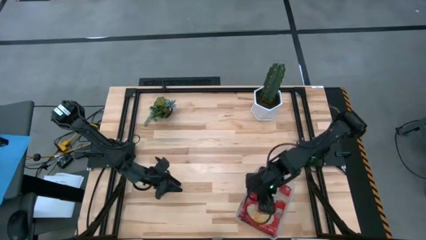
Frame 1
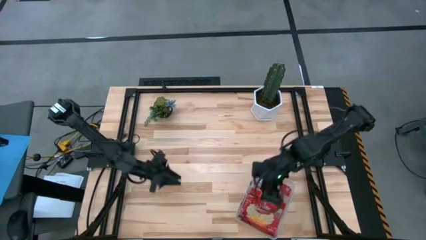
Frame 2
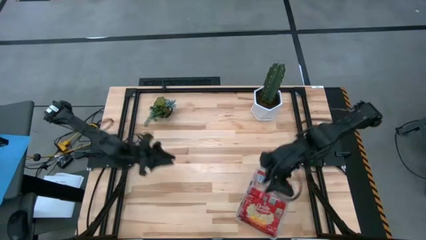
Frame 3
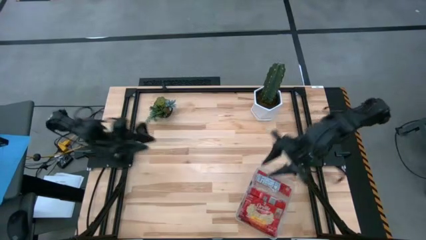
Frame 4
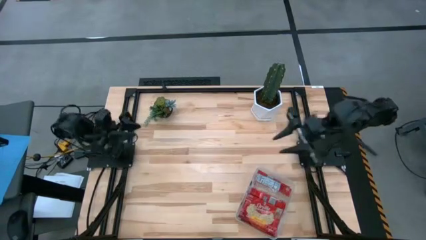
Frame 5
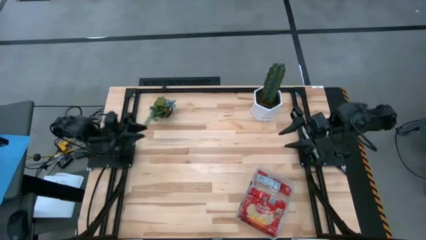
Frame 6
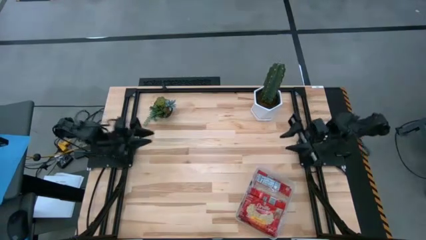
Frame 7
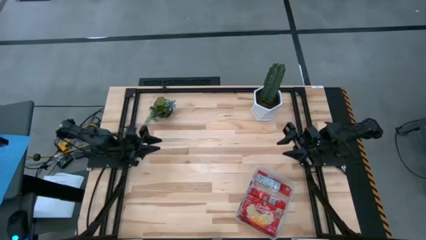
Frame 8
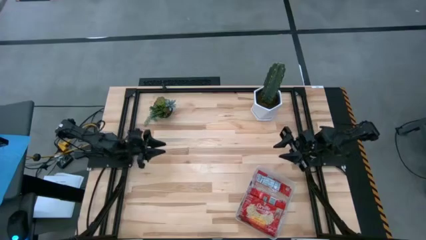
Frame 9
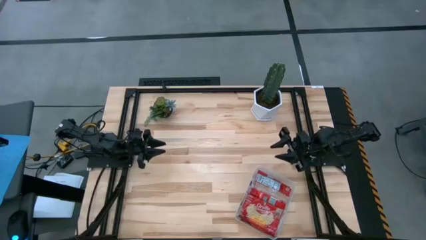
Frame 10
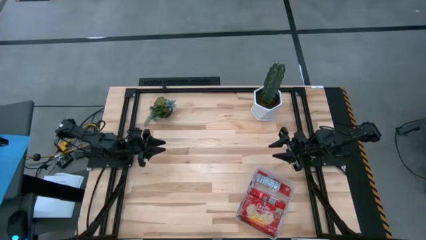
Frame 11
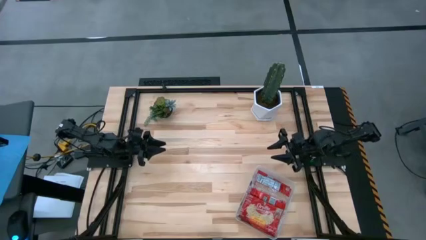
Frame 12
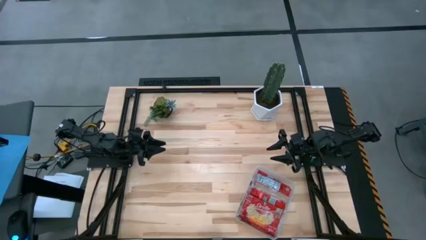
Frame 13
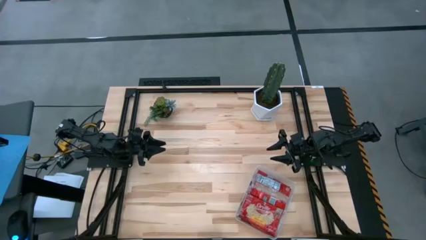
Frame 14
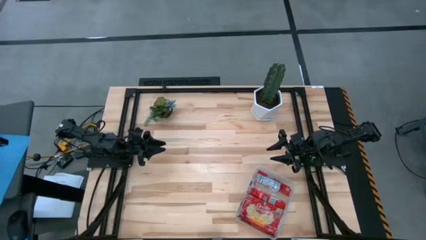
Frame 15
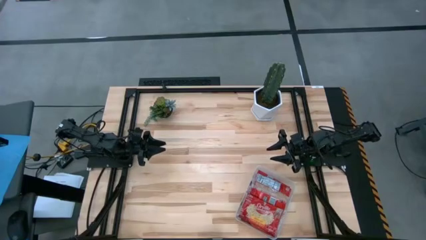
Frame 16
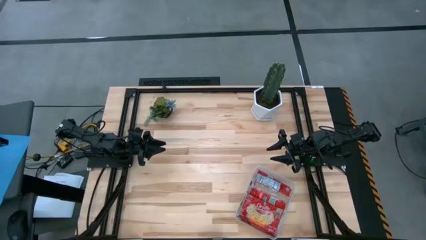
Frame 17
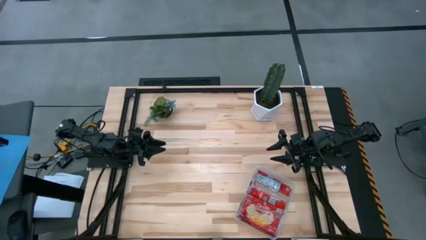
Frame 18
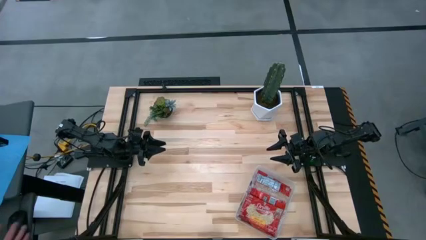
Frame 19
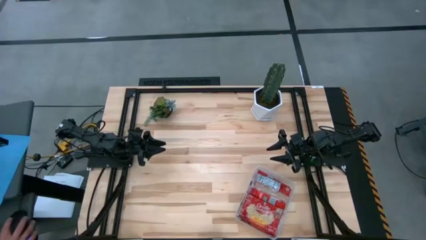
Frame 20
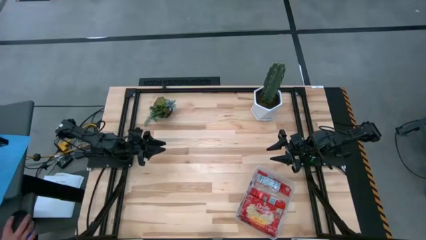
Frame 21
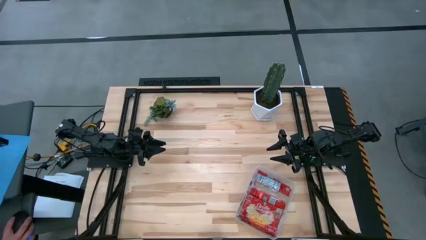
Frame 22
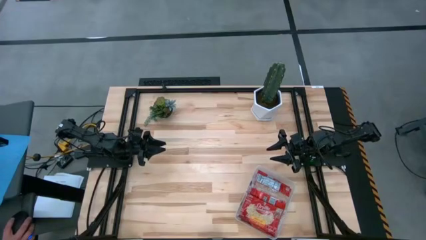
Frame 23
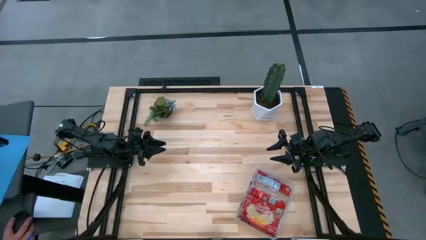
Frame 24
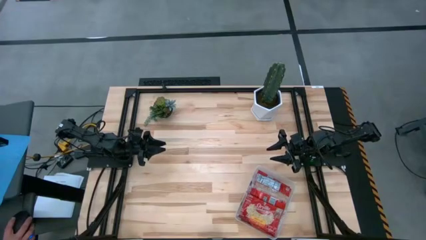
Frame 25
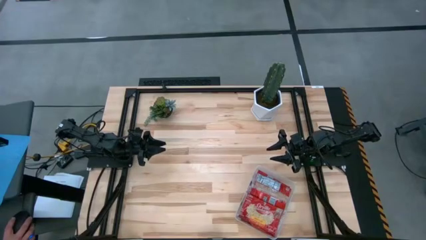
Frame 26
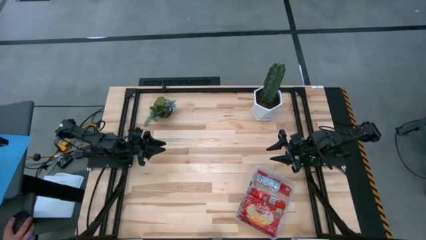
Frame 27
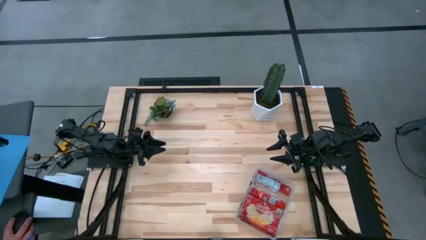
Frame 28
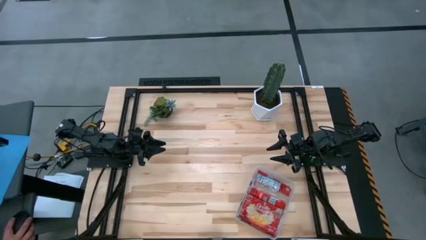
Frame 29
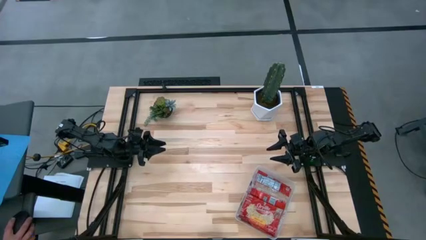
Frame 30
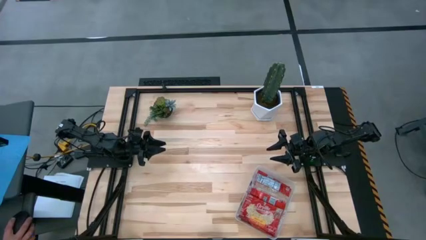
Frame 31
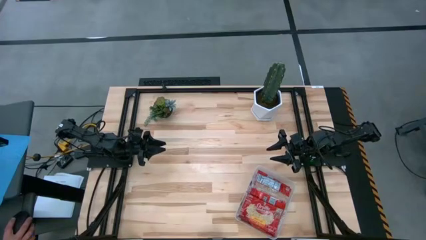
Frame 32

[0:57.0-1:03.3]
Task: Sort popcorn bags into baskets
Return to Home Position

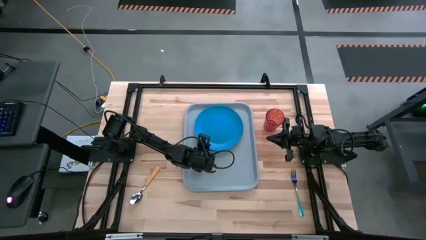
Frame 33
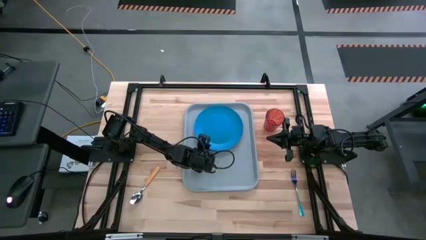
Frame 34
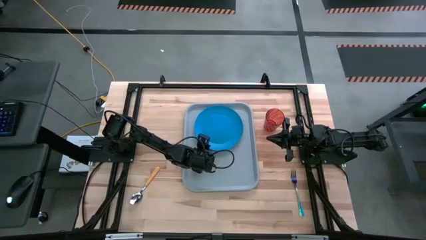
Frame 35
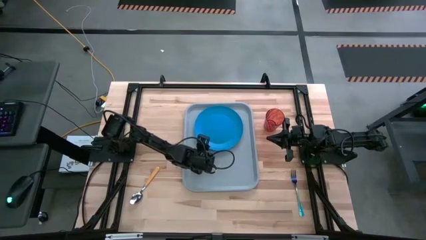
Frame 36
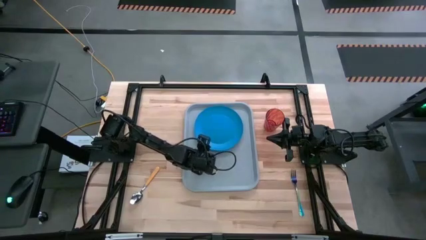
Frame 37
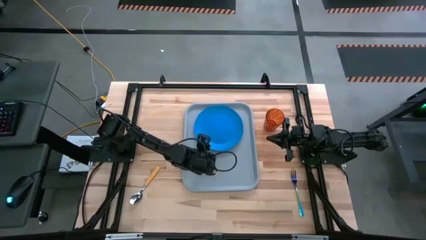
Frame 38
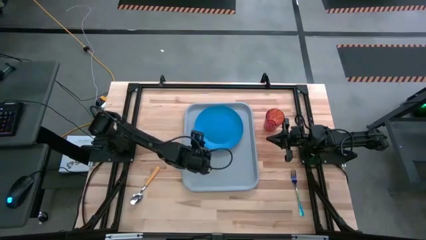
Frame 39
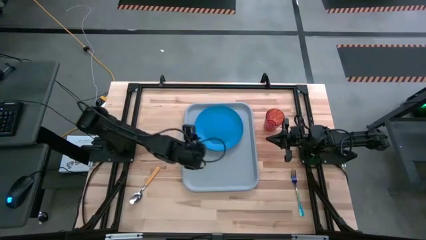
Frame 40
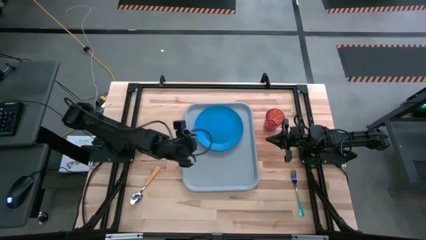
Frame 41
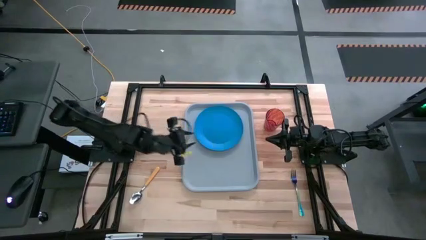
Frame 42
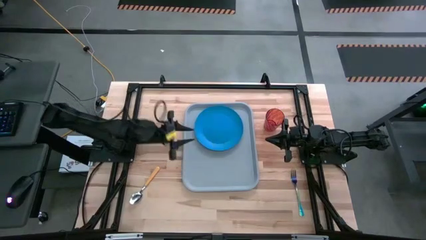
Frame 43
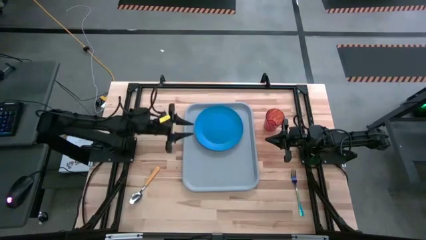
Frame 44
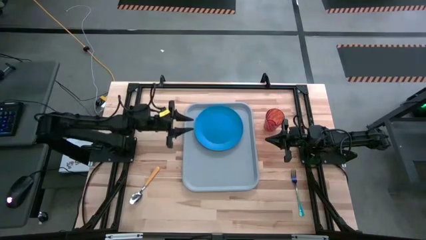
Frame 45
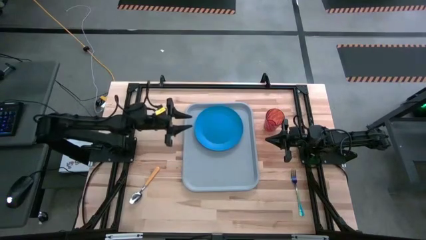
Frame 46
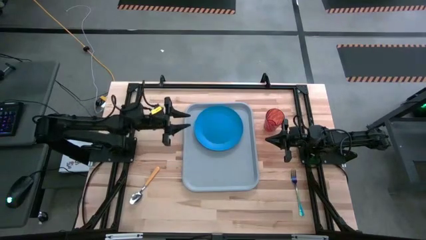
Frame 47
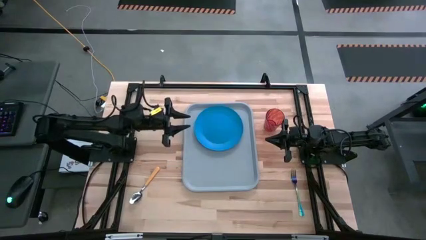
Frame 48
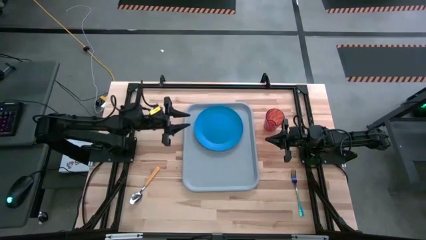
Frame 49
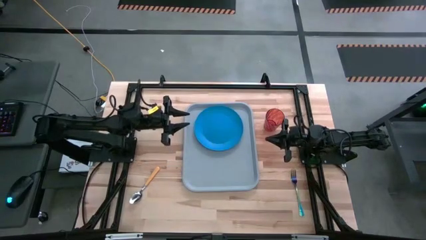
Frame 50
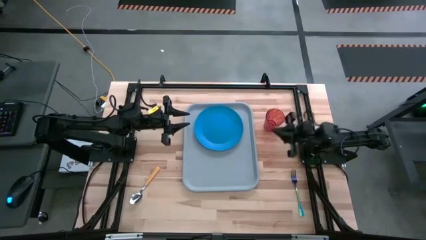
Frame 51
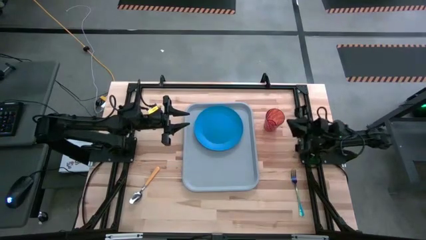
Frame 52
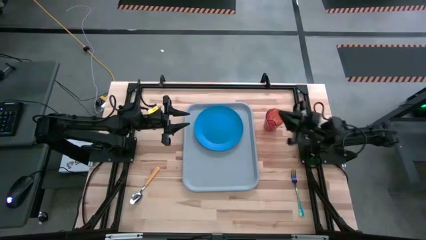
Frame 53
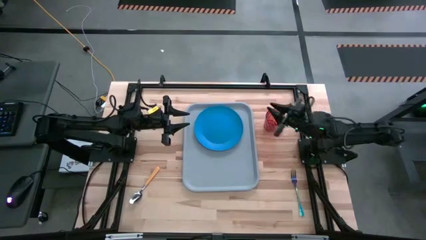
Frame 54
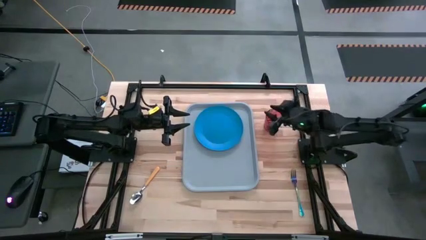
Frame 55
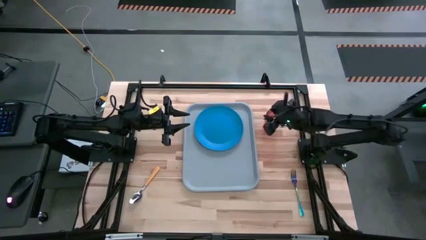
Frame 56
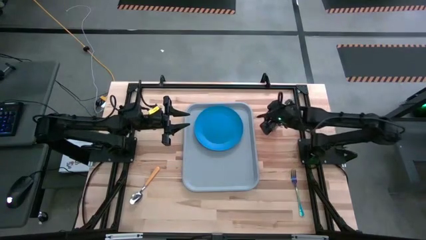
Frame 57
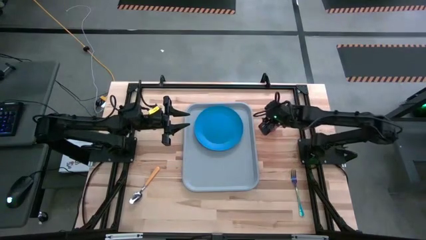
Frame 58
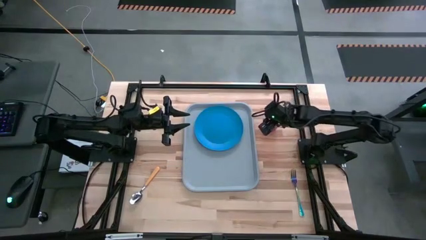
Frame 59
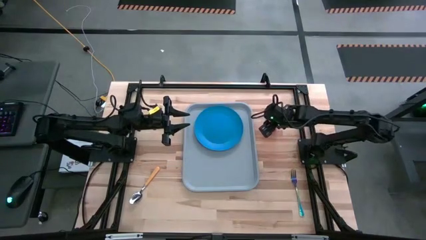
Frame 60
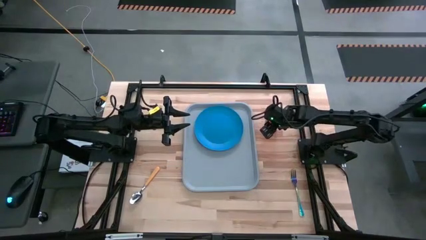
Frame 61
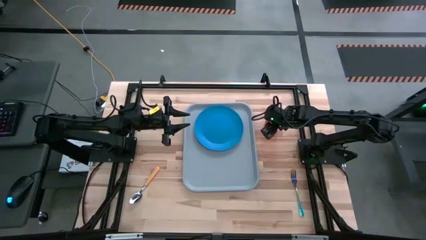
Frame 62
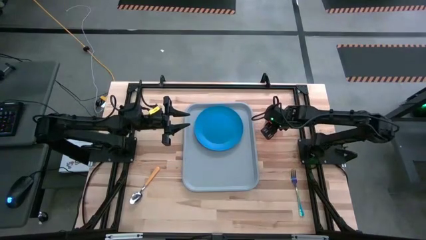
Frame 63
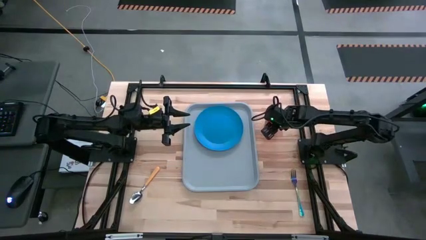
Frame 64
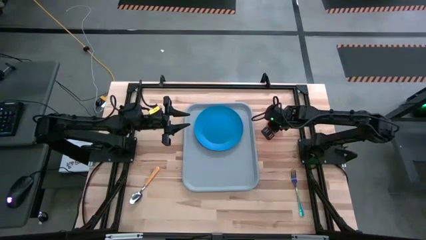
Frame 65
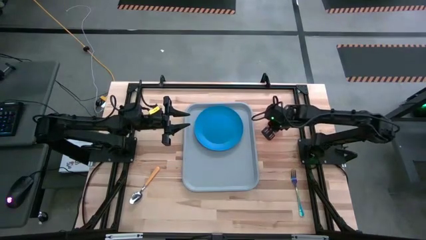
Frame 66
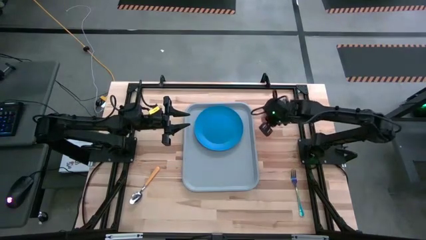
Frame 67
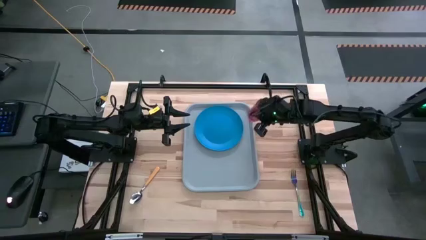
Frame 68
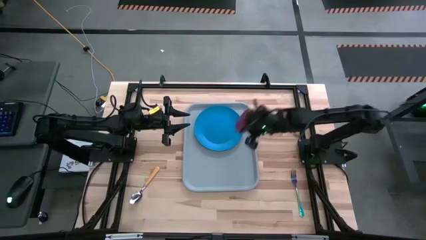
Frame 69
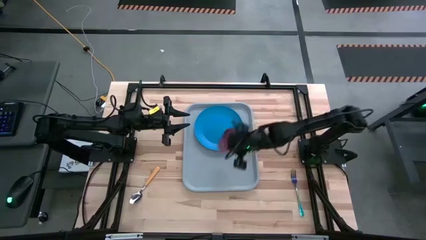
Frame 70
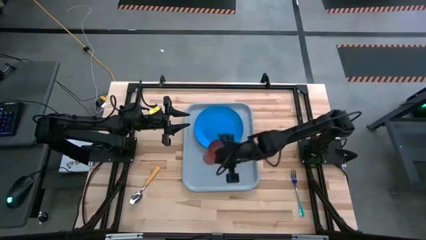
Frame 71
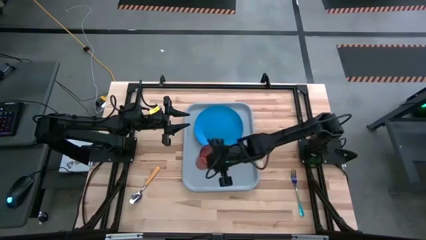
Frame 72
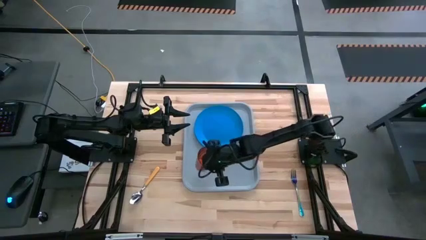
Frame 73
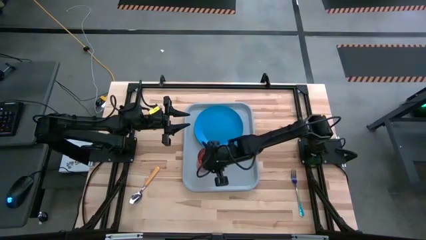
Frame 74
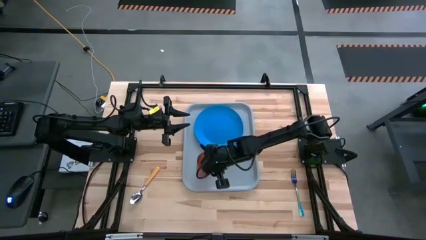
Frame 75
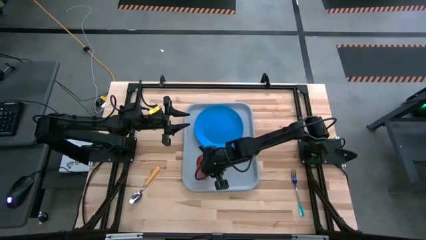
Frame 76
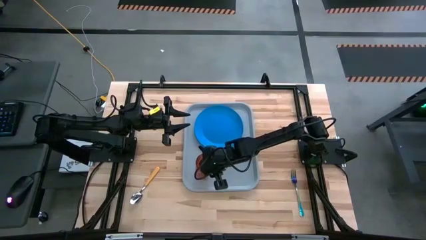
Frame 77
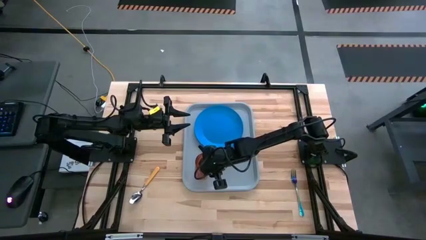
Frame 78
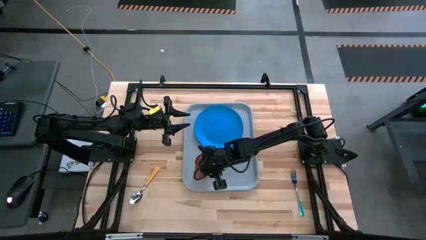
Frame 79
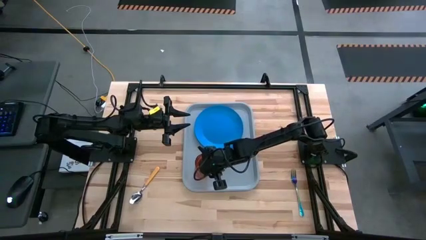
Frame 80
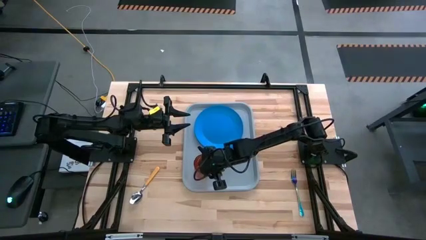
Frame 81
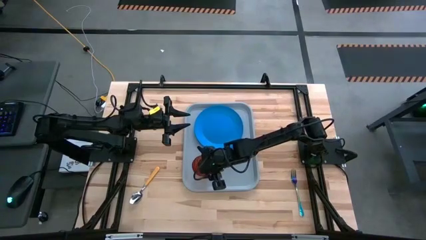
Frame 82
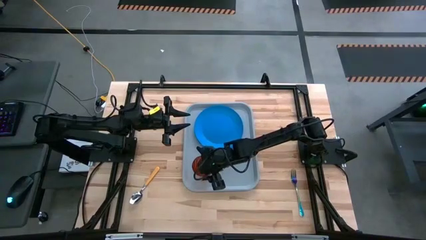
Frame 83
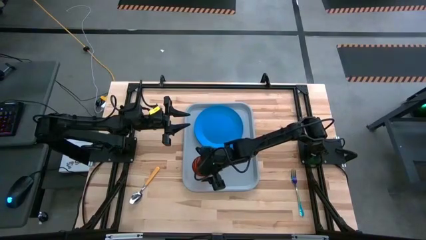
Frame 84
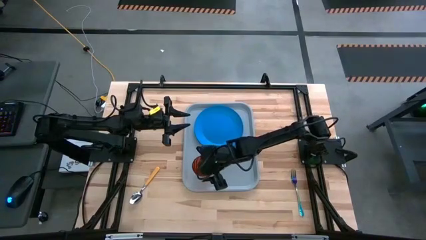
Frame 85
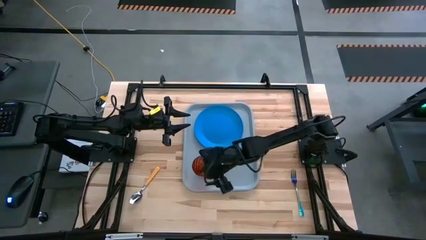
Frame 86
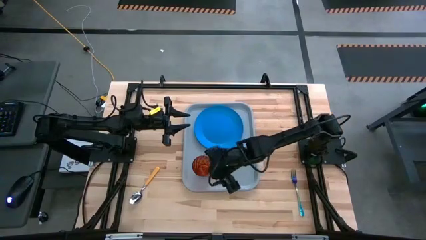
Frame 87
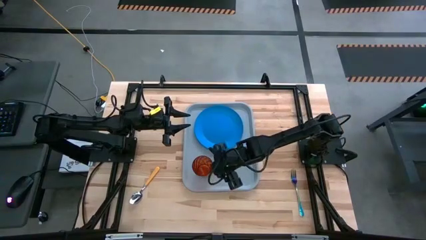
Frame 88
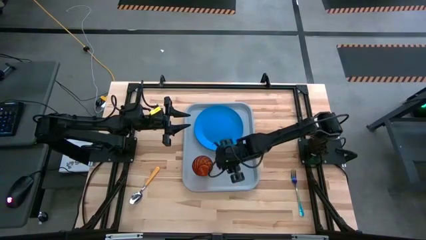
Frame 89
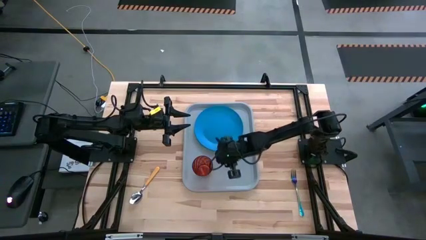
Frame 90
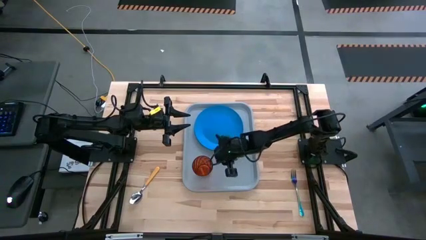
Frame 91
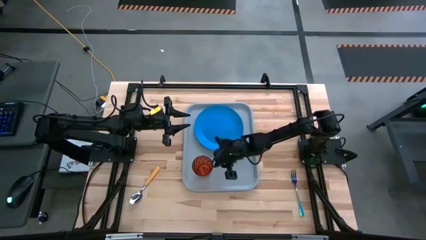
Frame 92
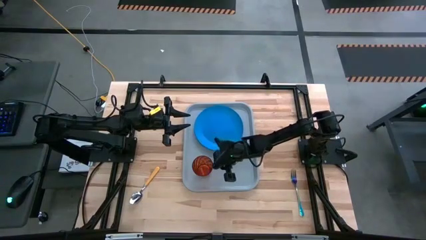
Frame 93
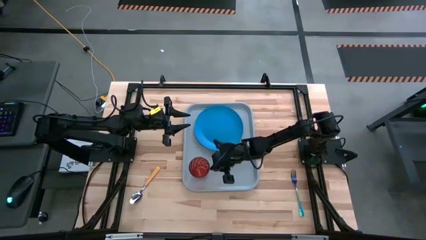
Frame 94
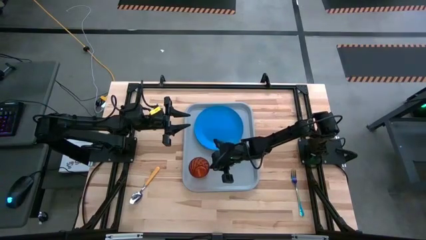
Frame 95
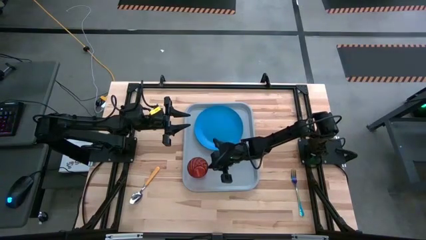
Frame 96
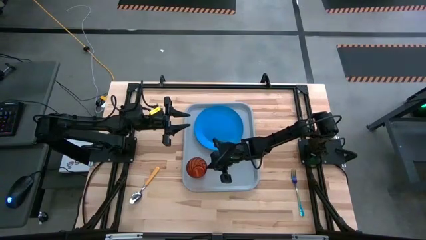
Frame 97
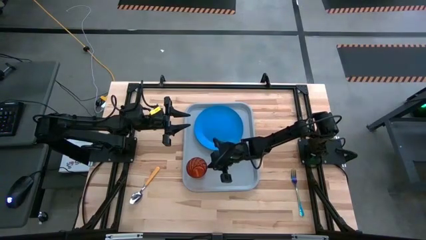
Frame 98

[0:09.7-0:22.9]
Task: Pick and place plate/cup/fork/spoon on tray
Put the brown glass on the gray serving tray to the top left of the blue plate
